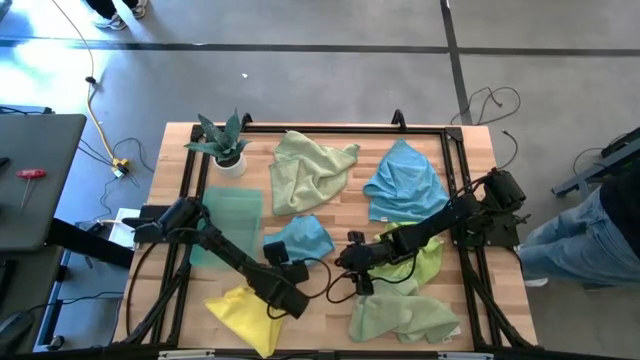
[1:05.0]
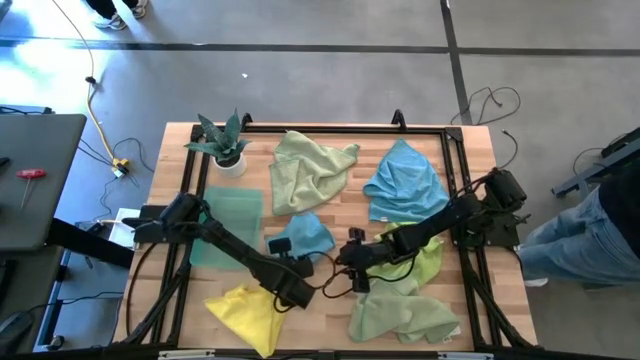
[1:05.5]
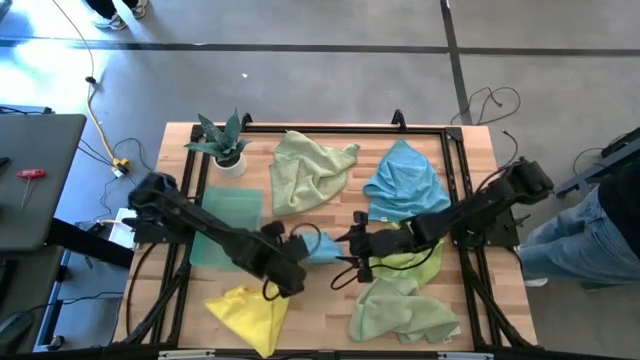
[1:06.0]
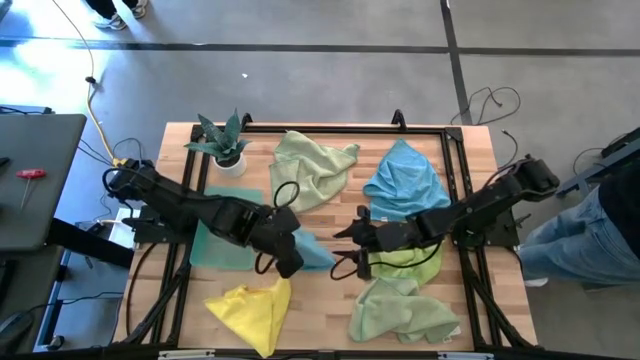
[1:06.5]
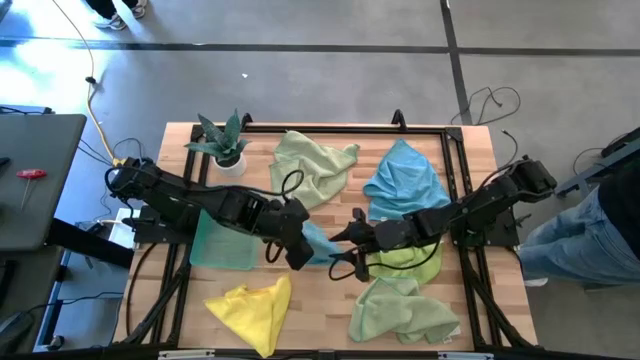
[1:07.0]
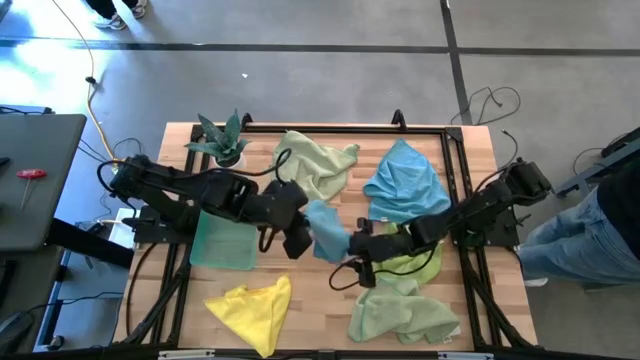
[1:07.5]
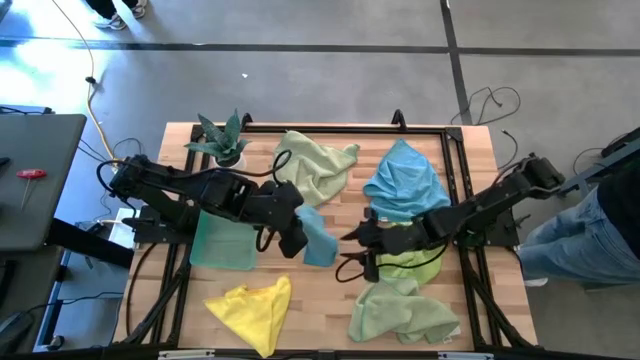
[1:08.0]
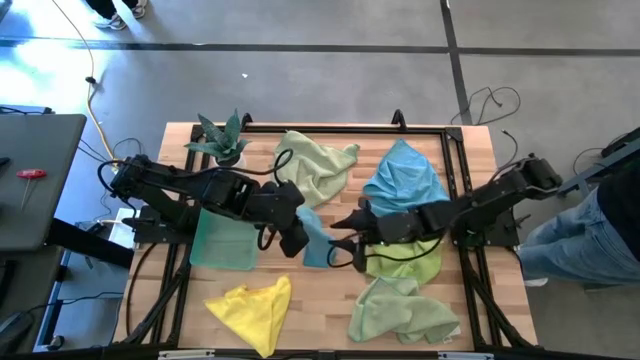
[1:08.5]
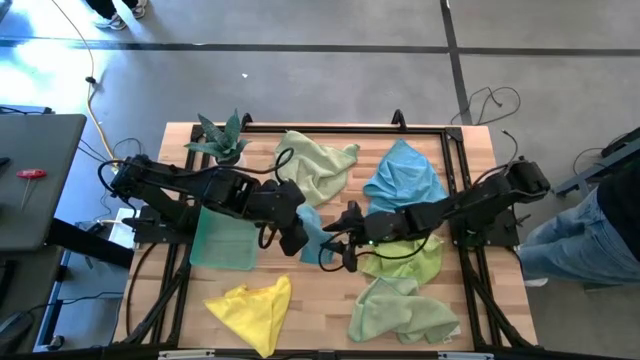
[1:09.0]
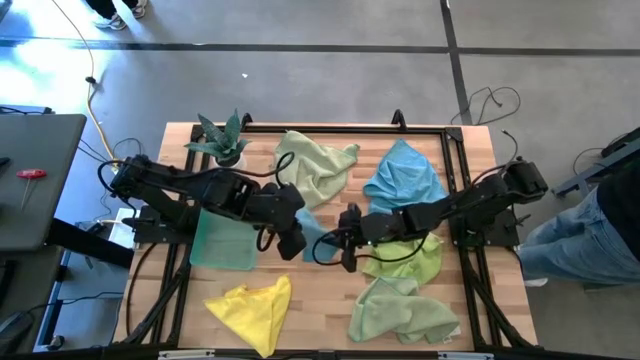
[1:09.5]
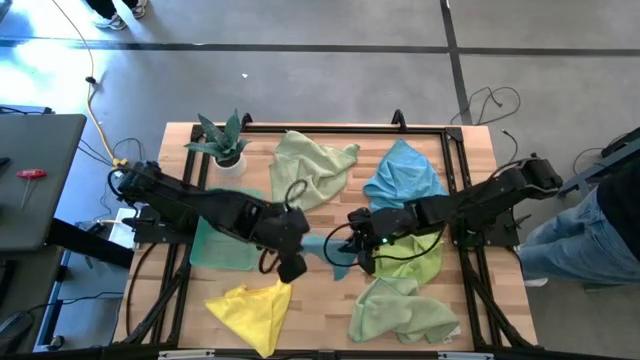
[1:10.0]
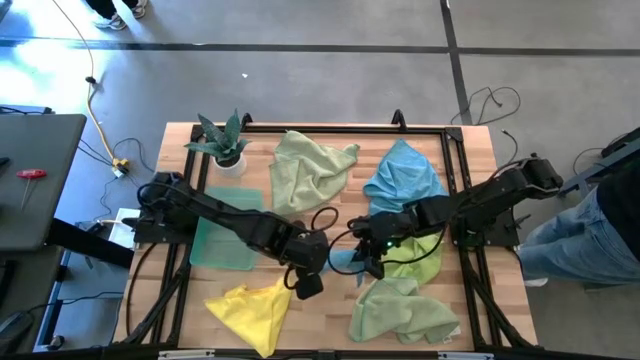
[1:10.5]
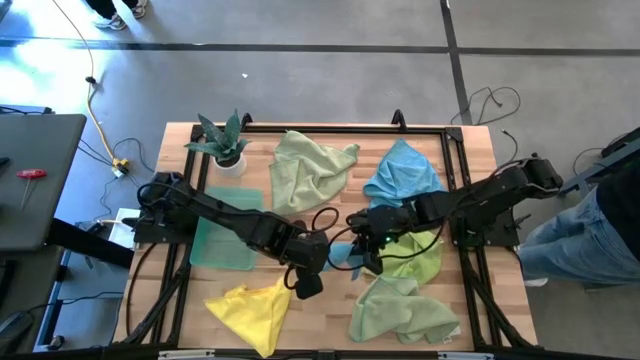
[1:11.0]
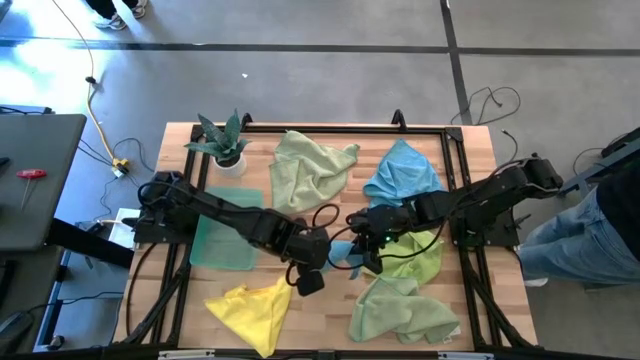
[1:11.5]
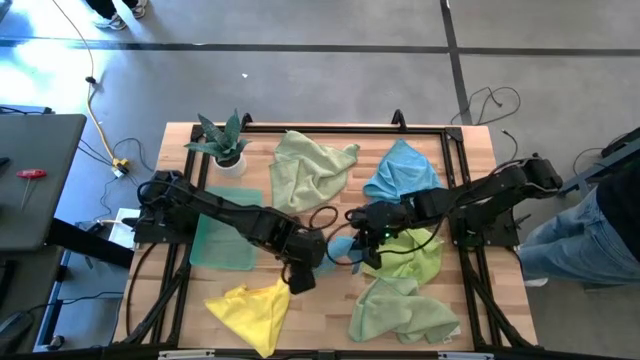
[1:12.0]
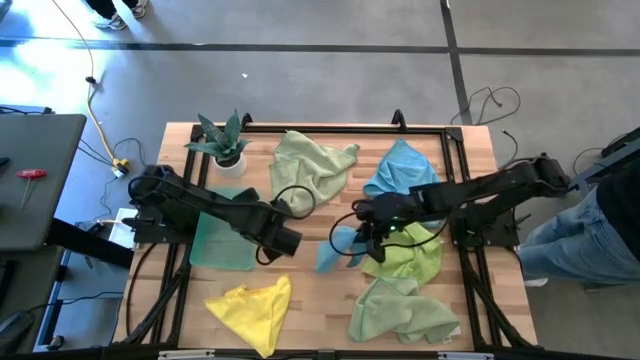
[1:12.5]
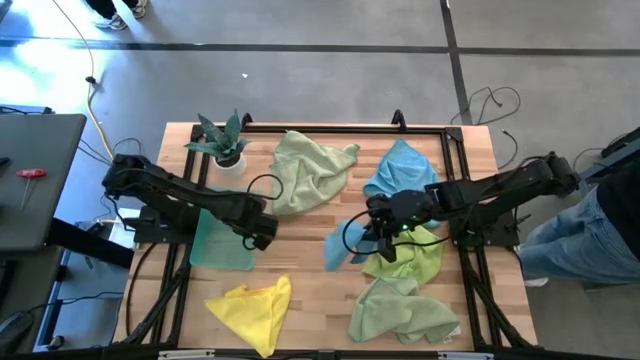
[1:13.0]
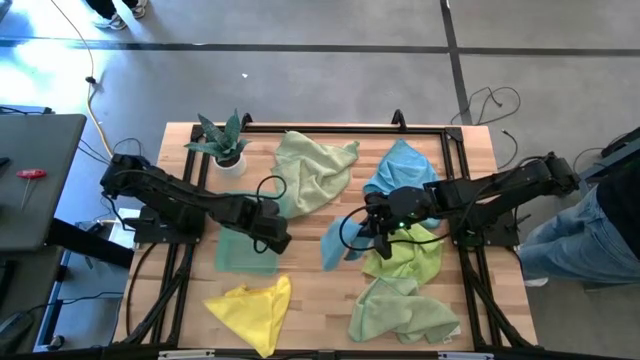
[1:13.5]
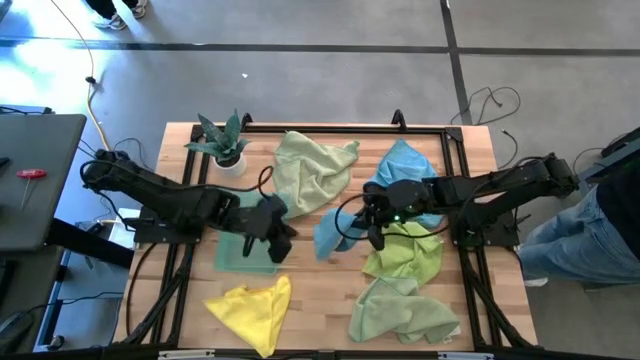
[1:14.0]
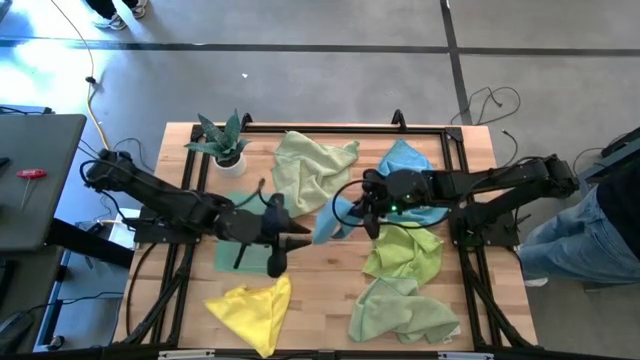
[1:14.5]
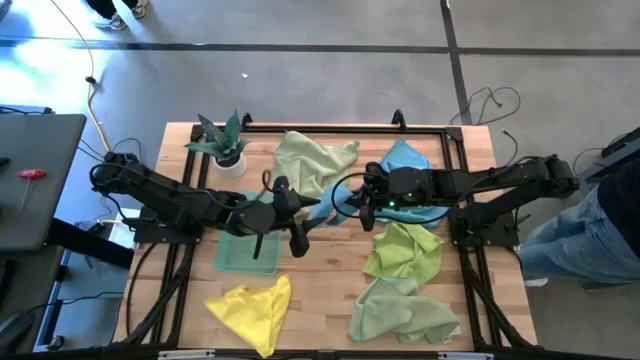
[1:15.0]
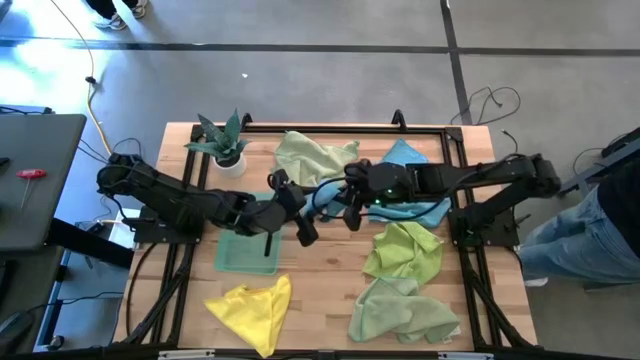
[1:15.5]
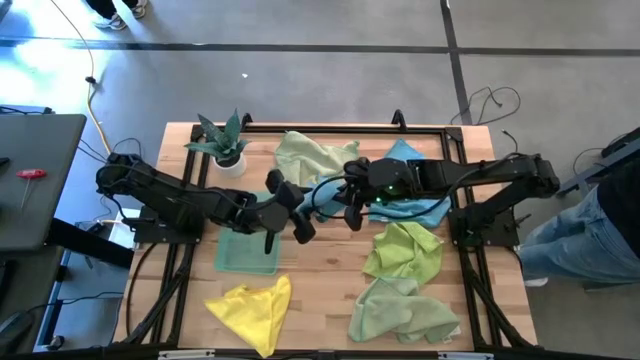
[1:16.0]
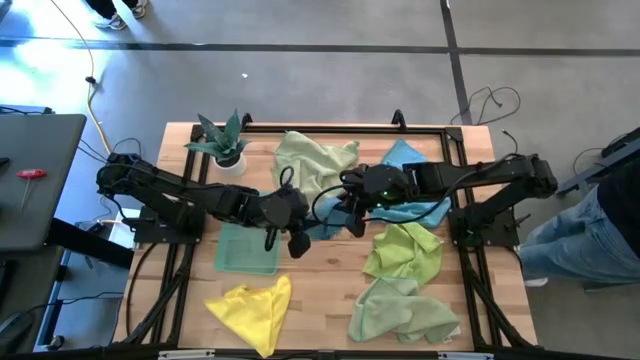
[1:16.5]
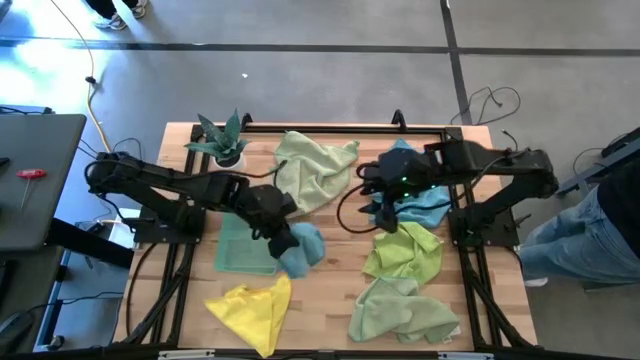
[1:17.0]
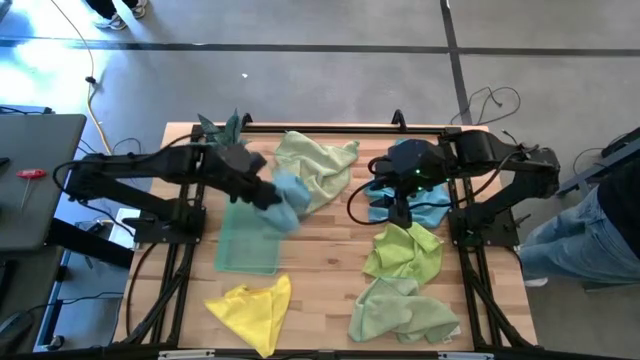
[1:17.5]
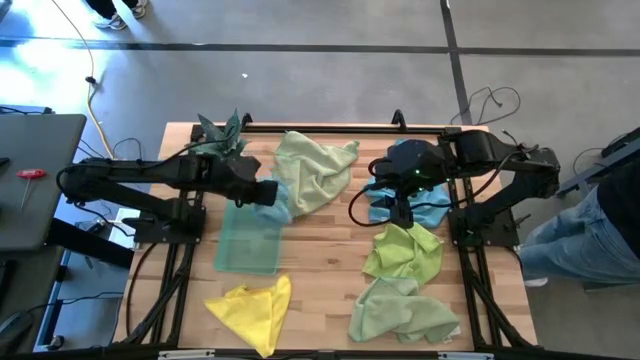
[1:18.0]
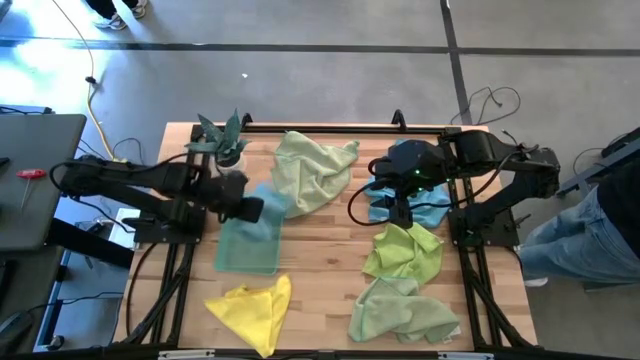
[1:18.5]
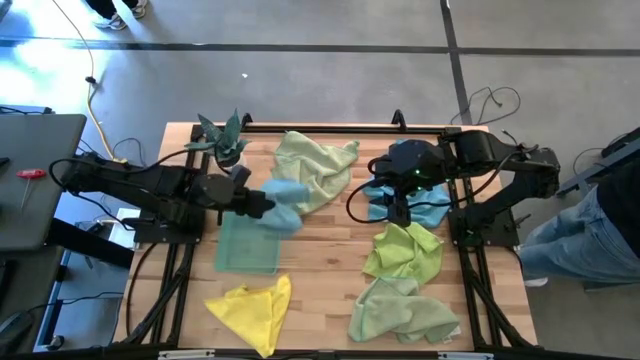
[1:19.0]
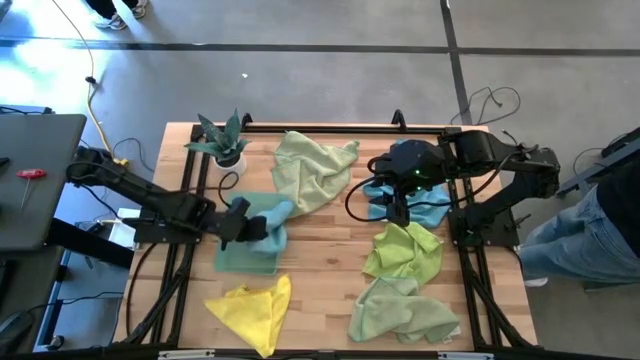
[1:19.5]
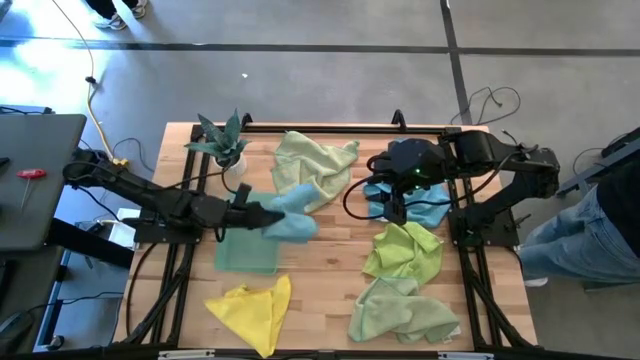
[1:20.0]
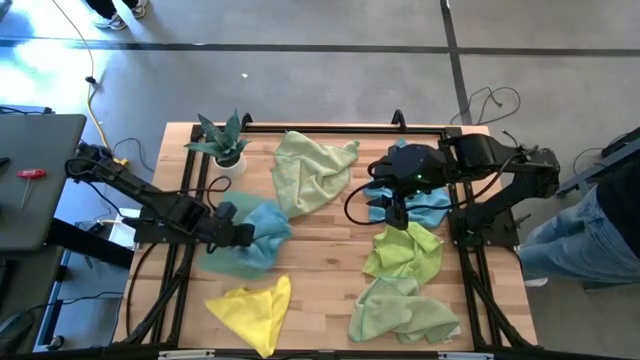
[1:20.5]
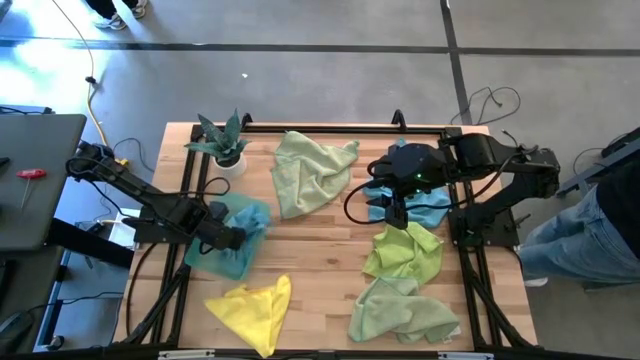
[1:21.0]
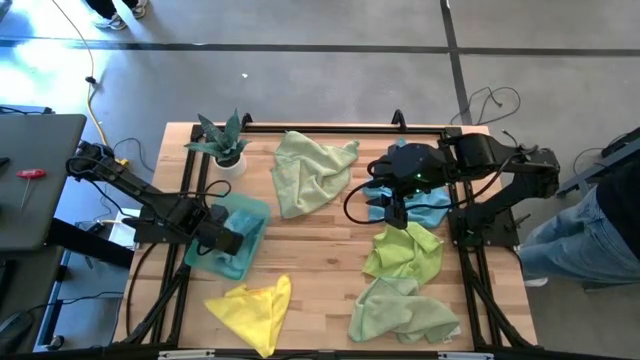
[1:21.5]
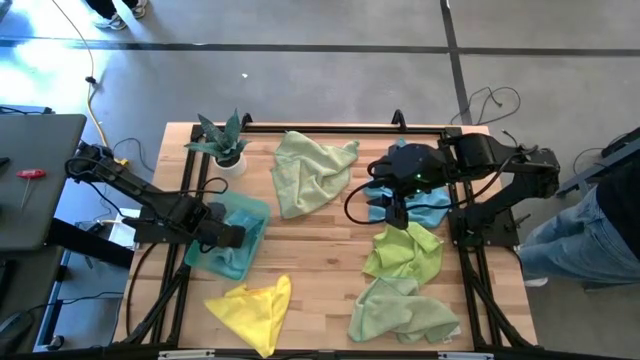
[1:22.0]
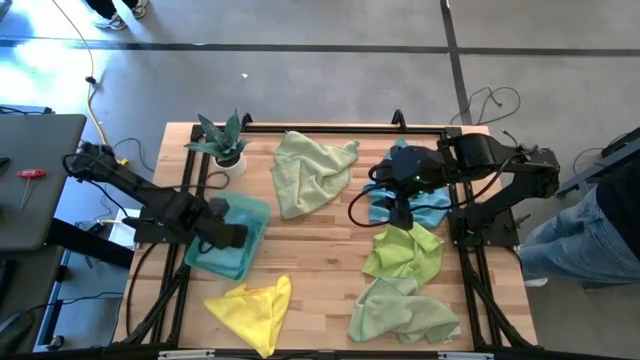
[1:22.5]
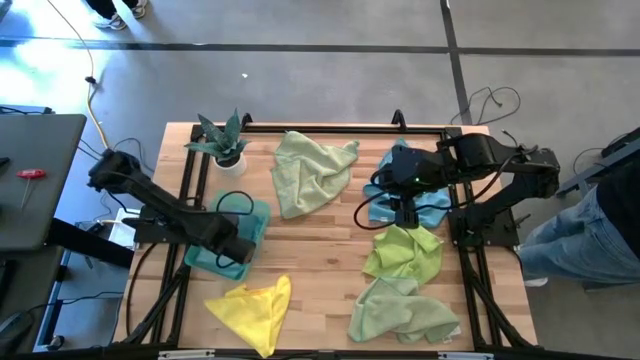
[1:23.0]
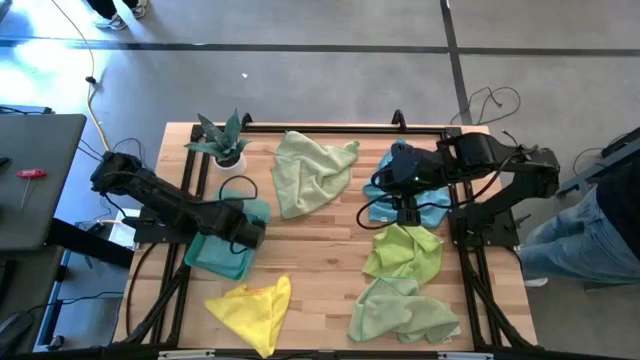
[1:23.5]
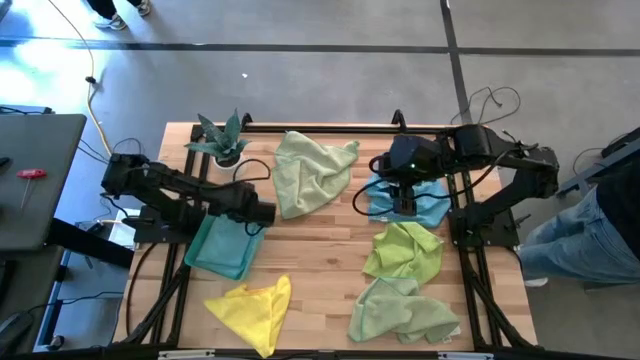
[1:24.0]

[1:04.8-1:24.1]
Task: Fold microfiber towels
Put the bottom blue microfiber towel into the green bin
